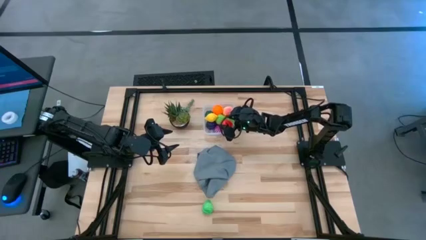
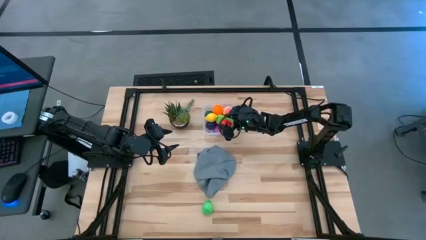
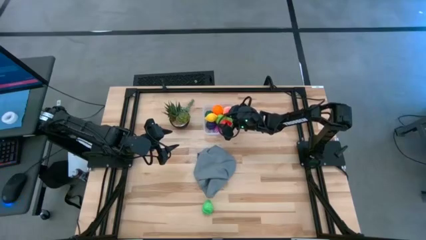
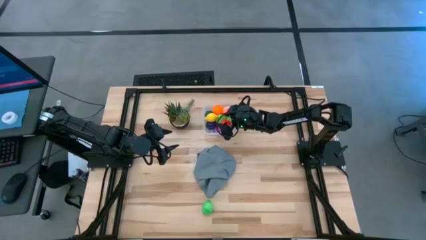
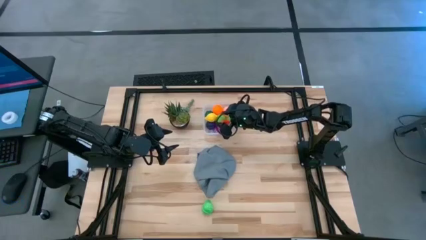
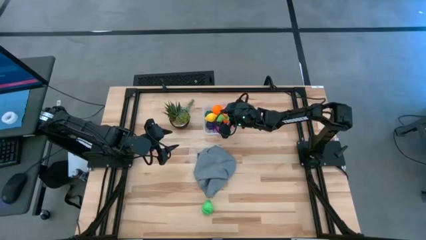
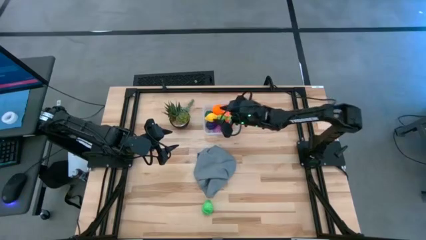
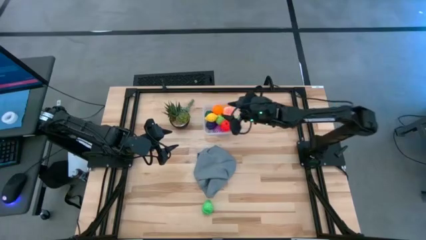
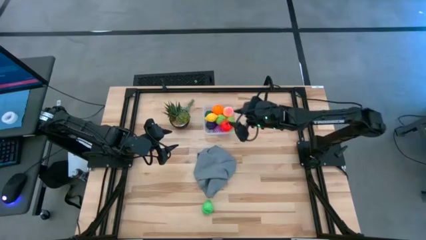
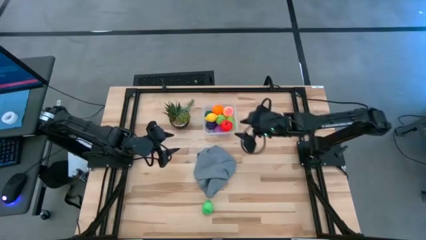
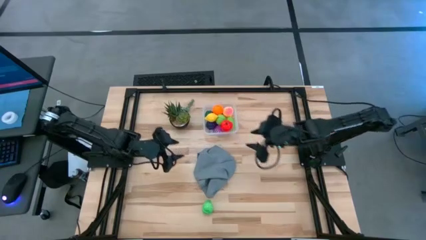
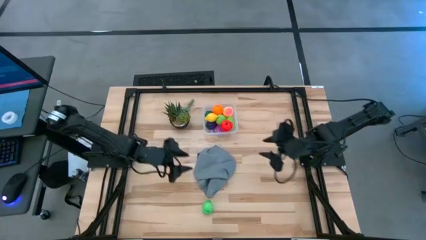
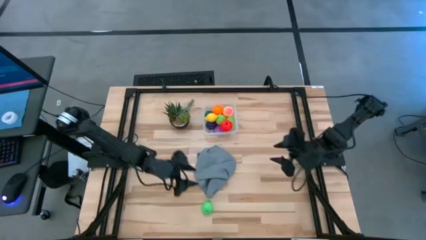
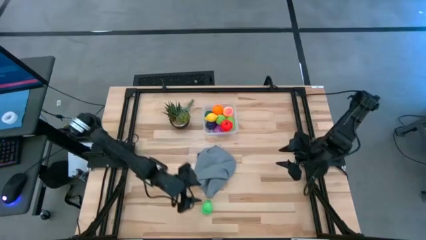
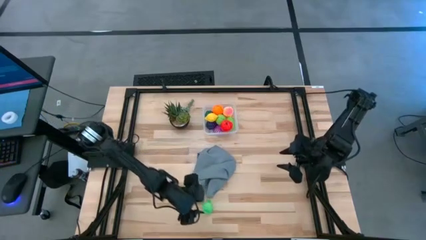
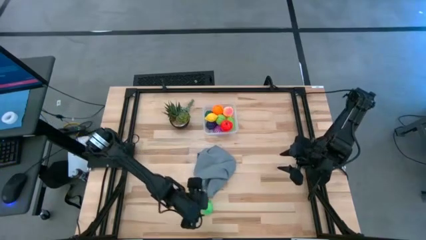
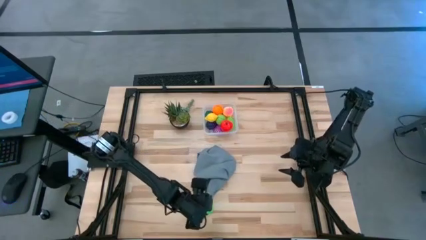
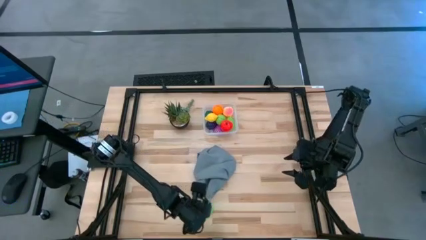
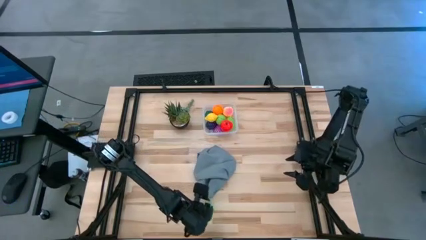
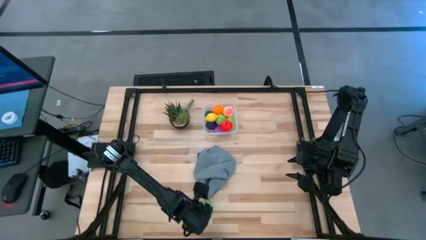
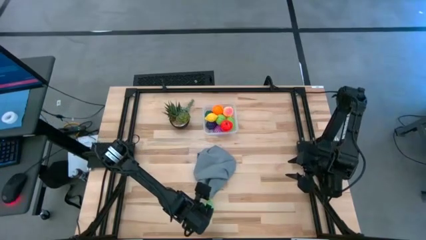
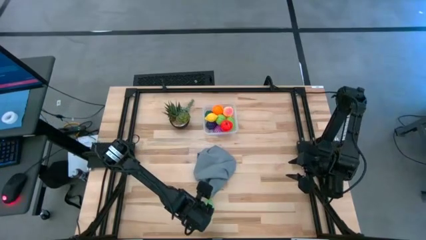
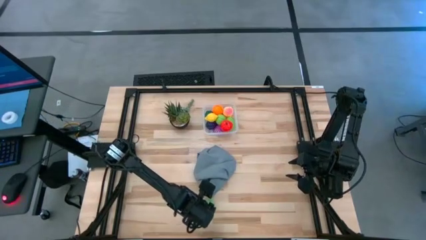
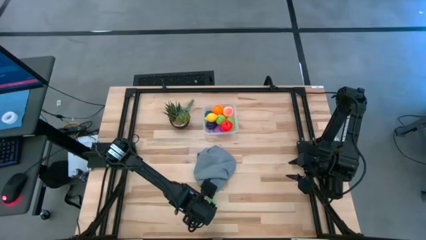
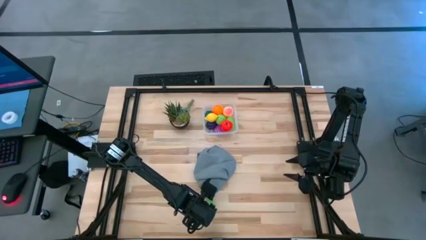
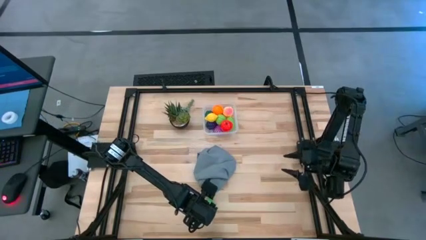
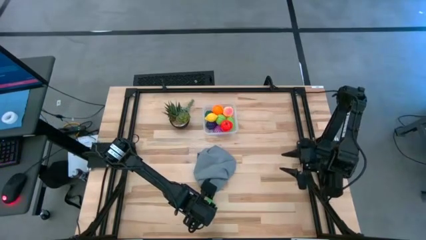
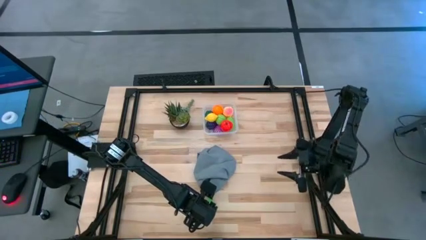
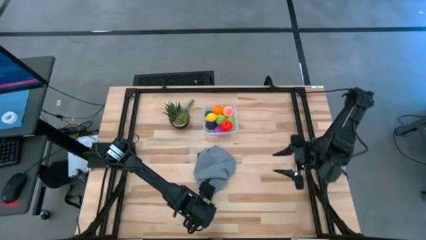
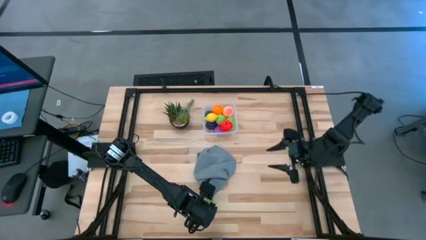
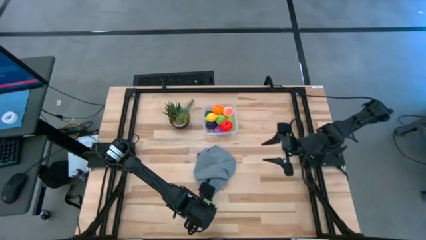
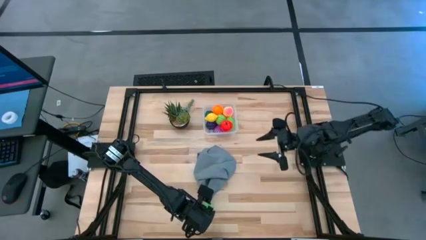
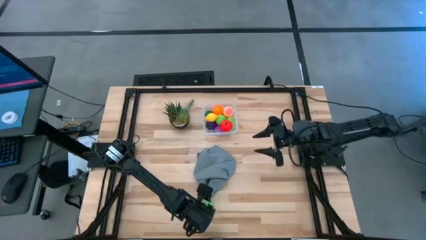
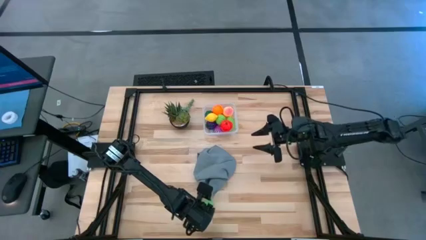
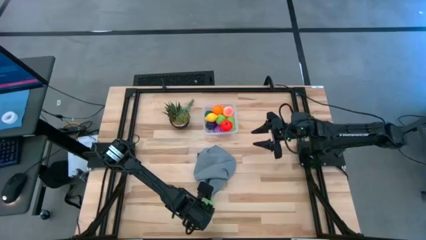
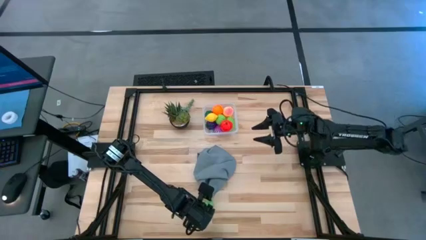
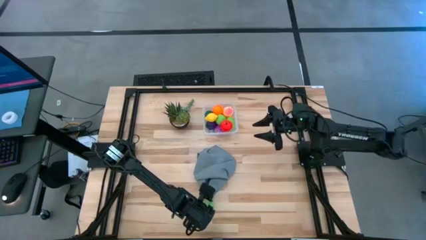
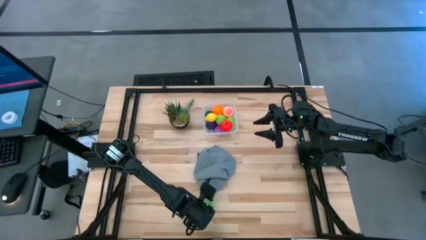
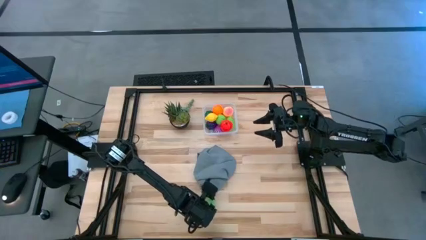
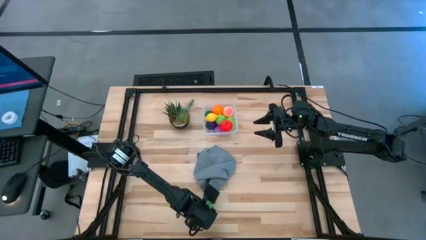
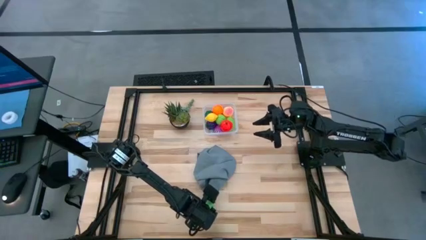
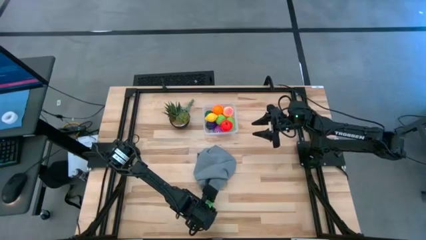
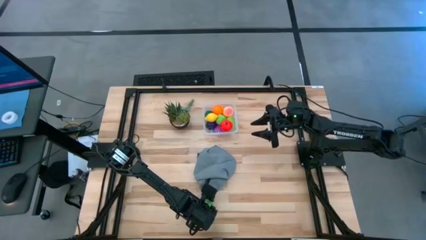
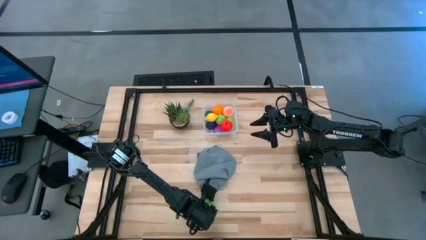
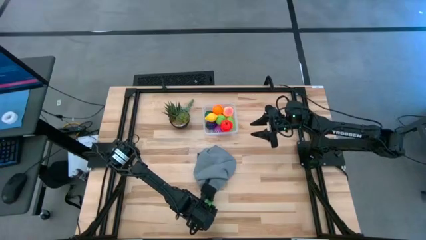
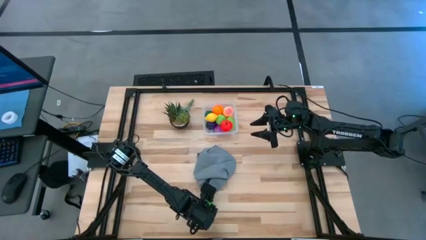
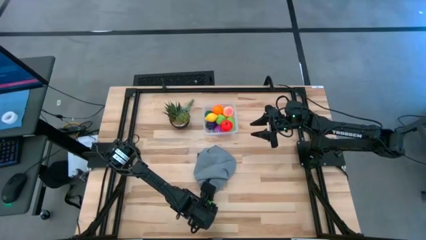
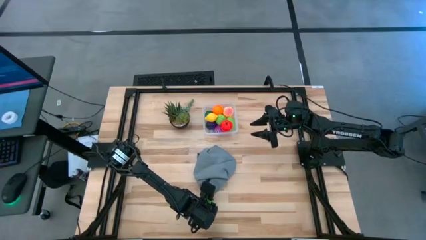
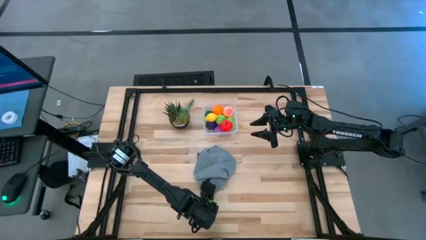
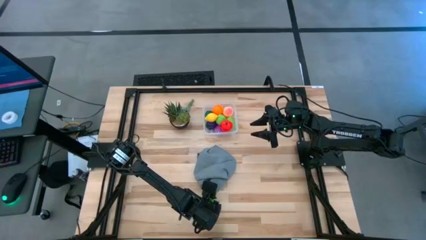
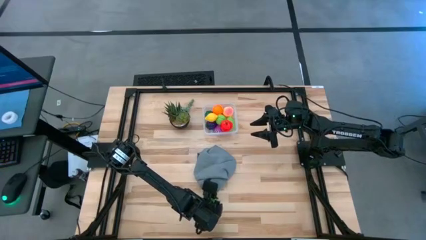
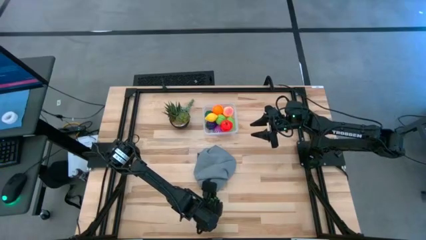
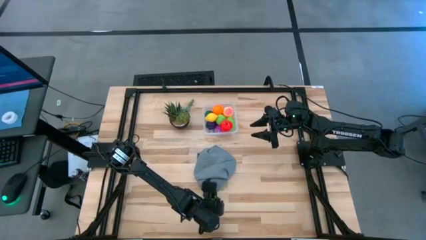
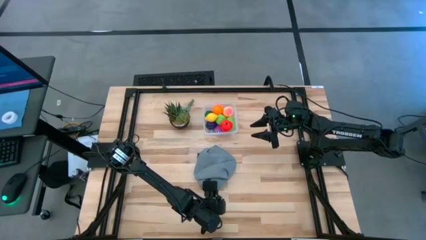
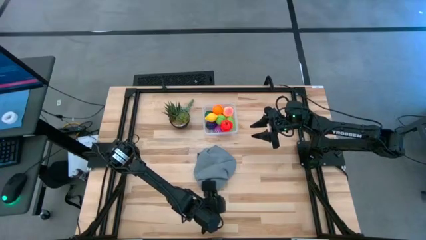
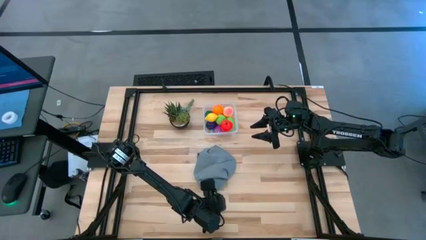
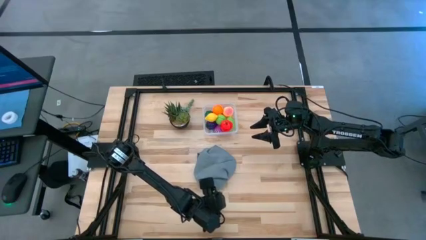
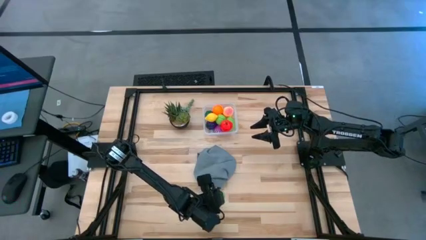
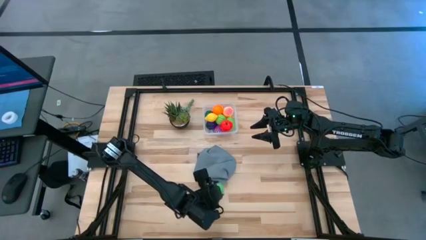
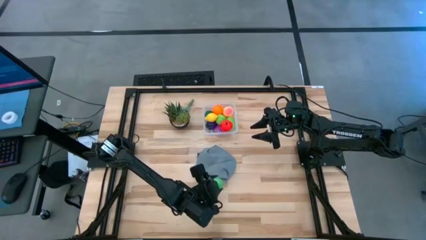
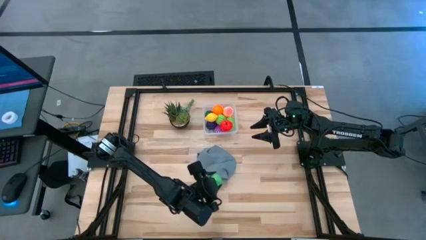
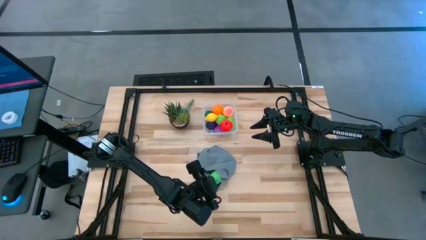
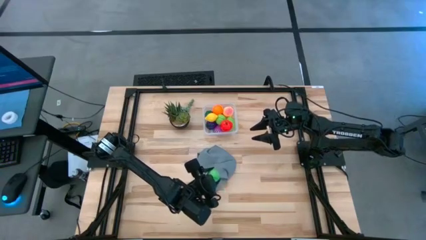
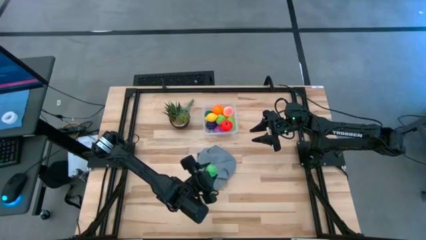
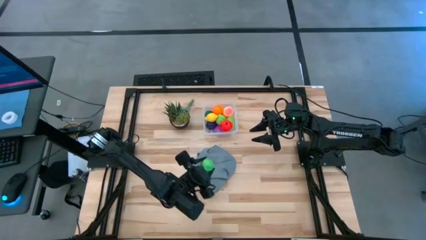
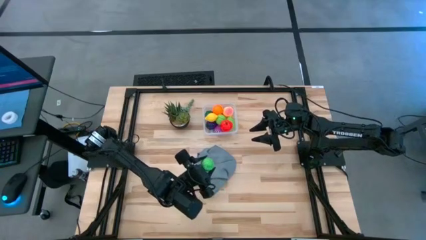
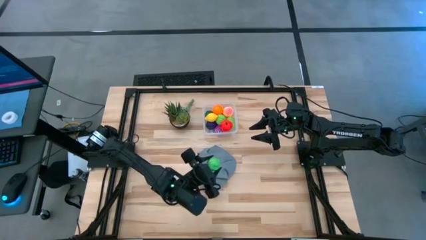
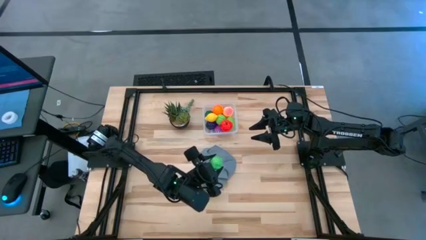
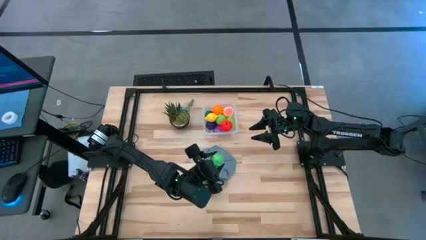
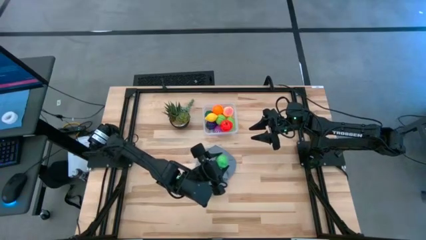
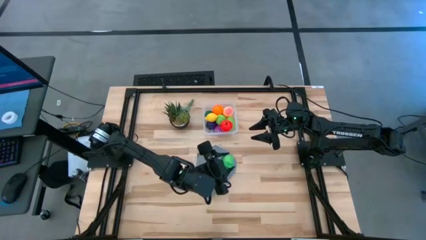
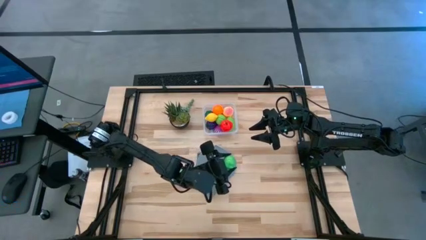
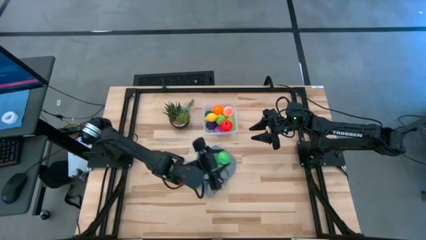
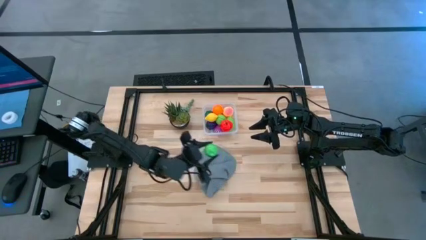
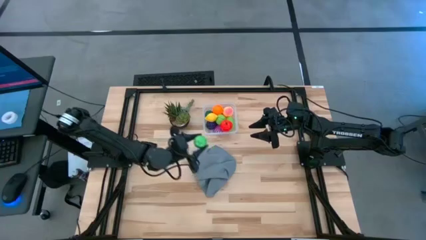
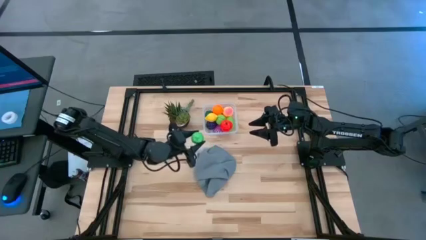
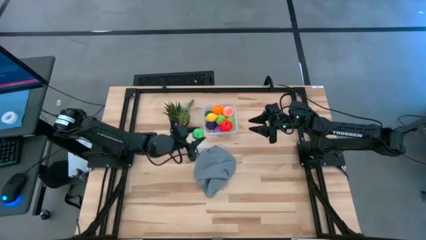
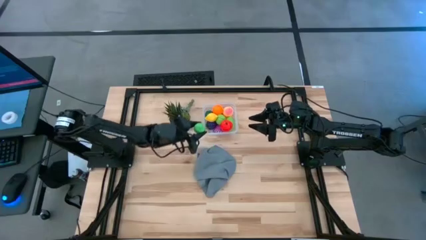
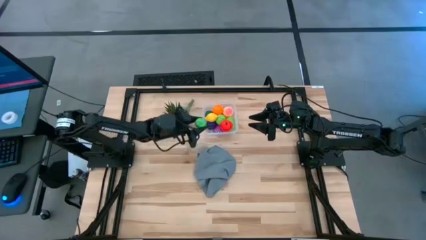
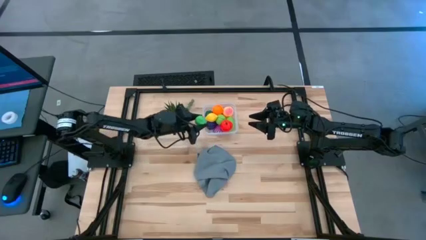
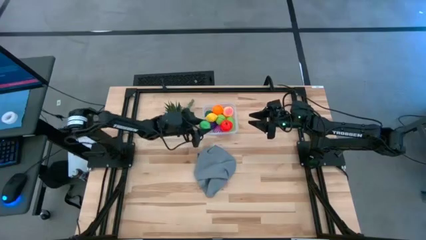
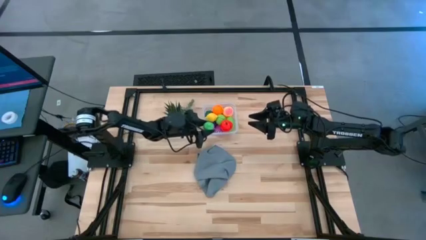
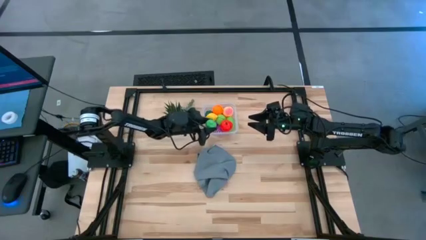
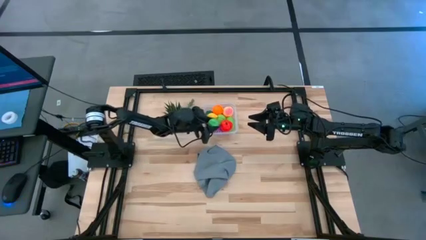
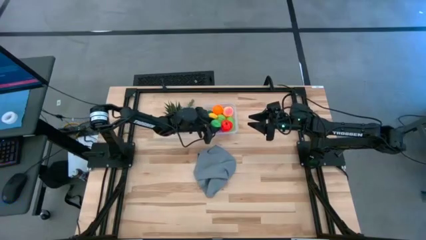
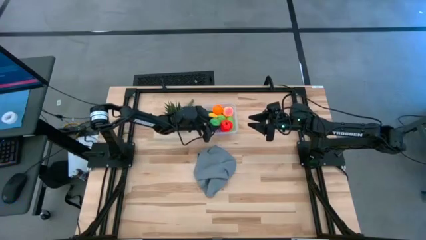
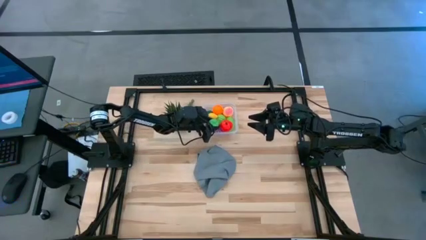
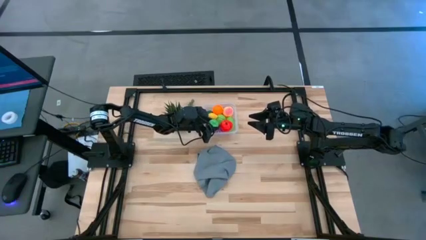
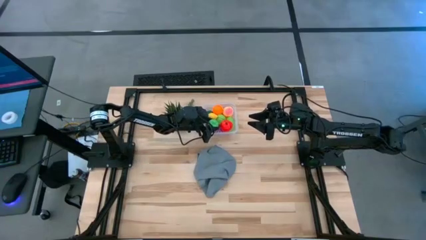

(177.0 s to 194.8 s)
Task: Pick and placing Produce into tupperware
Put the green pear into the transparent container
